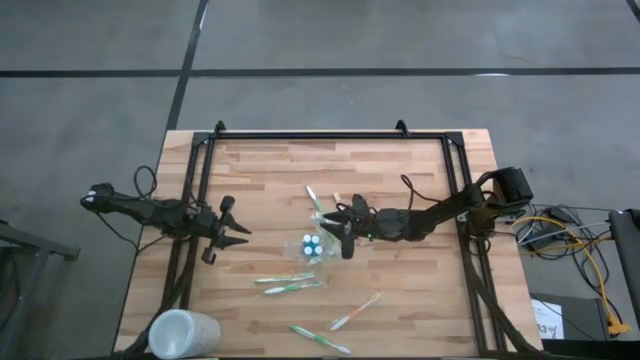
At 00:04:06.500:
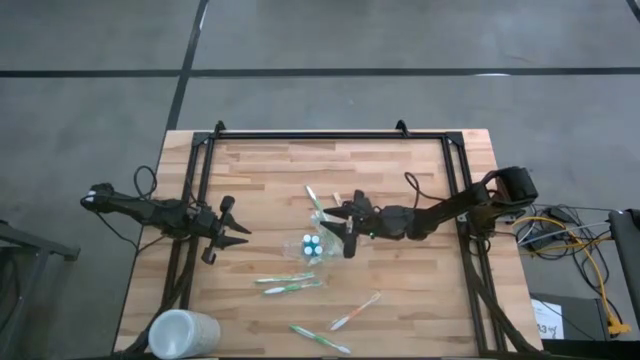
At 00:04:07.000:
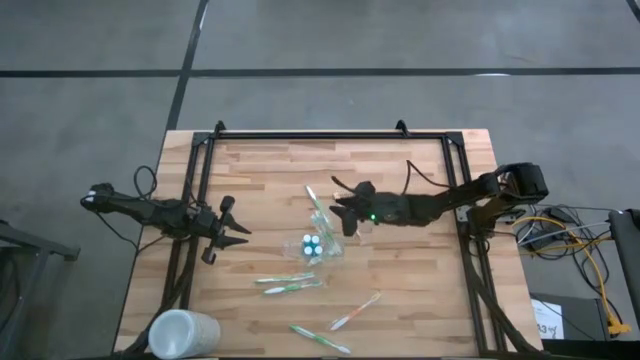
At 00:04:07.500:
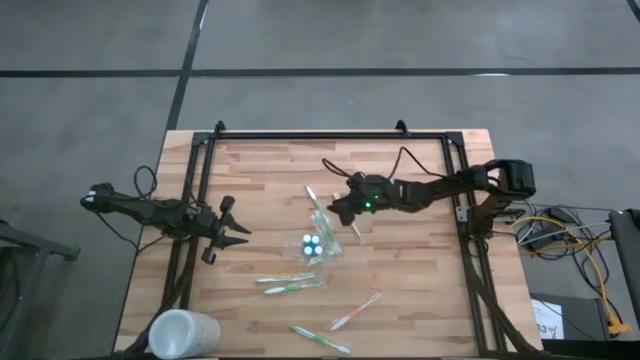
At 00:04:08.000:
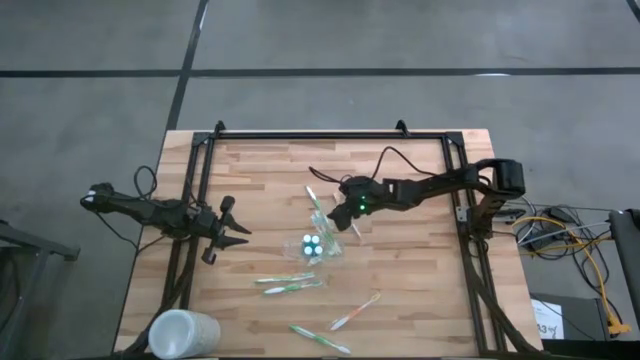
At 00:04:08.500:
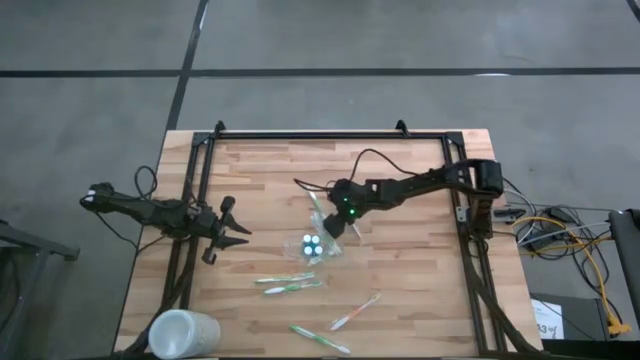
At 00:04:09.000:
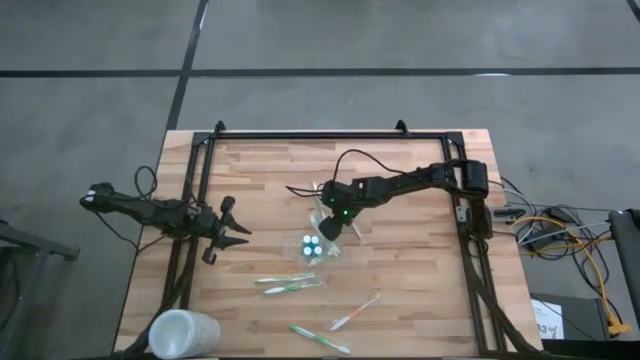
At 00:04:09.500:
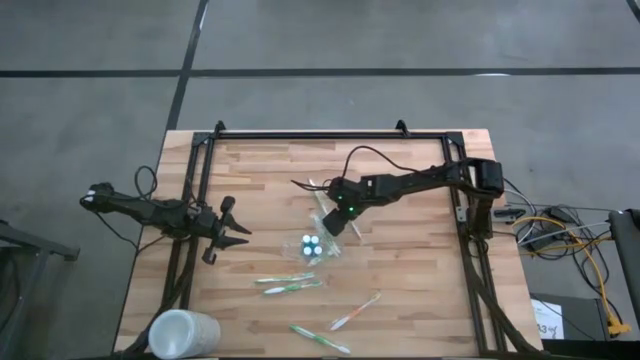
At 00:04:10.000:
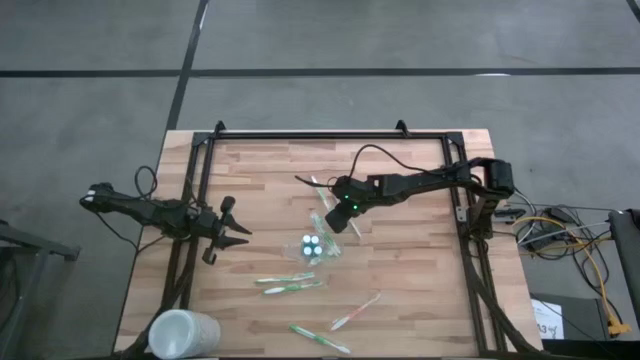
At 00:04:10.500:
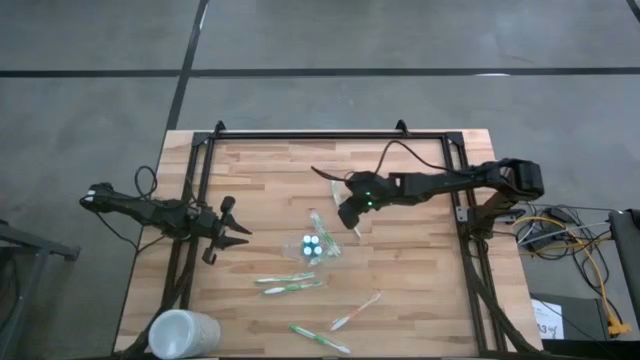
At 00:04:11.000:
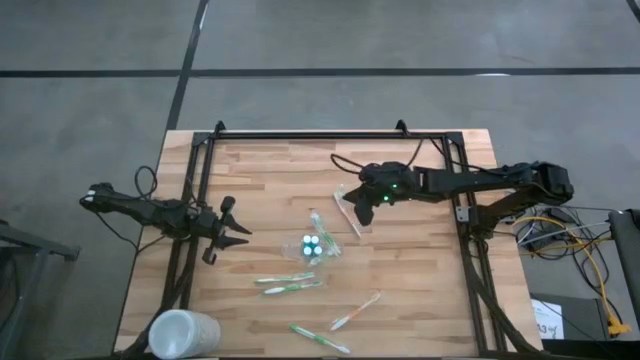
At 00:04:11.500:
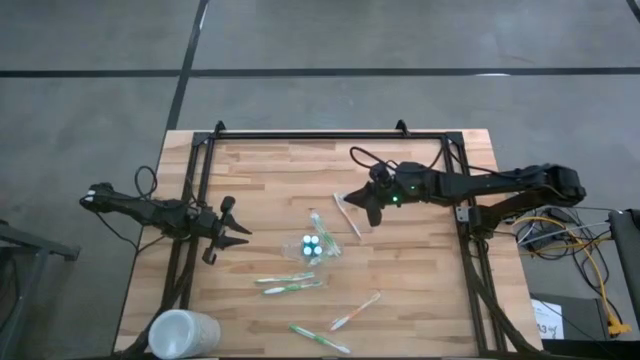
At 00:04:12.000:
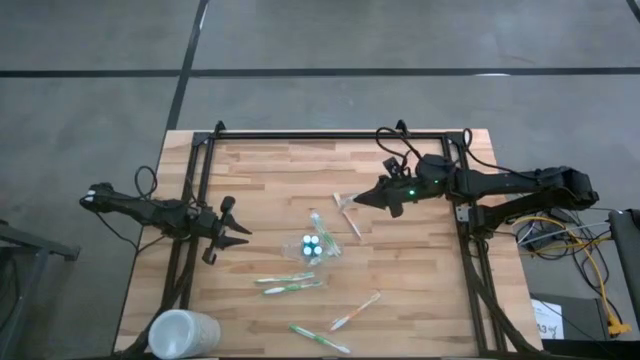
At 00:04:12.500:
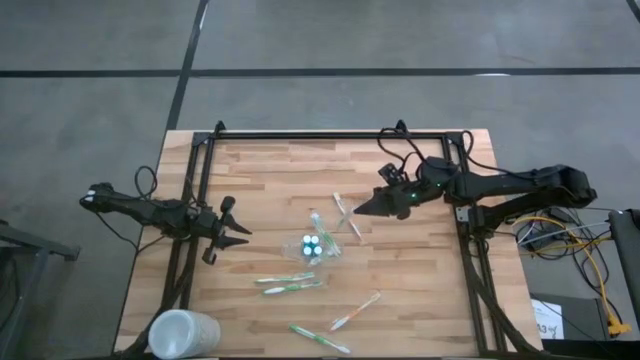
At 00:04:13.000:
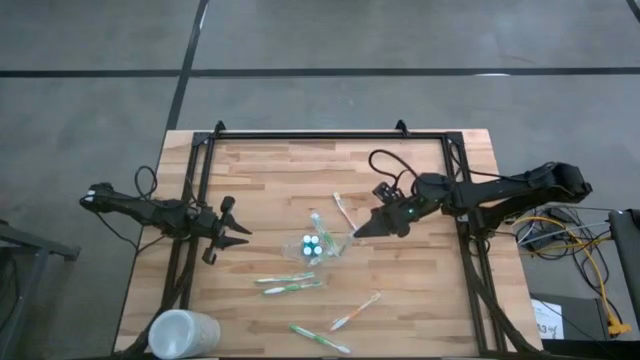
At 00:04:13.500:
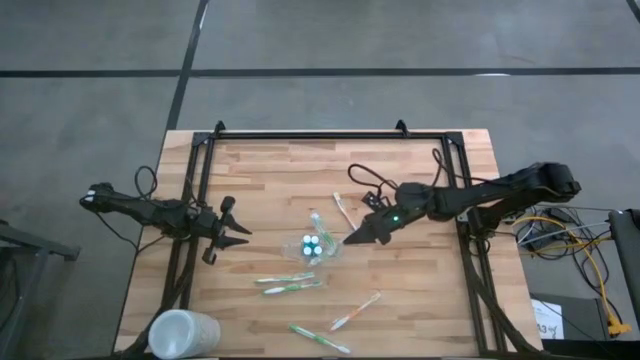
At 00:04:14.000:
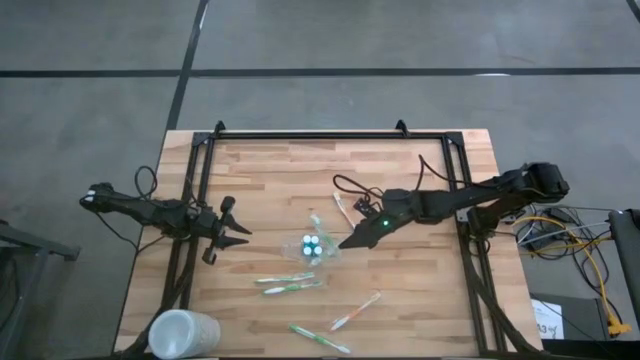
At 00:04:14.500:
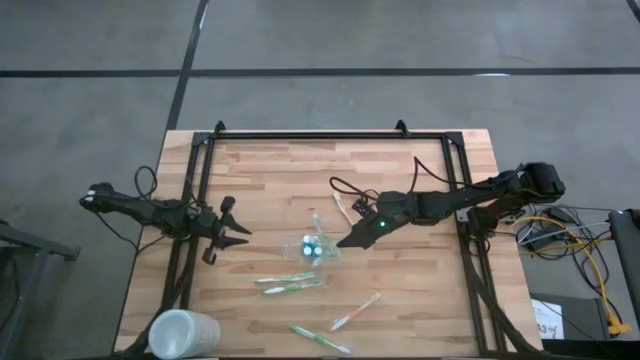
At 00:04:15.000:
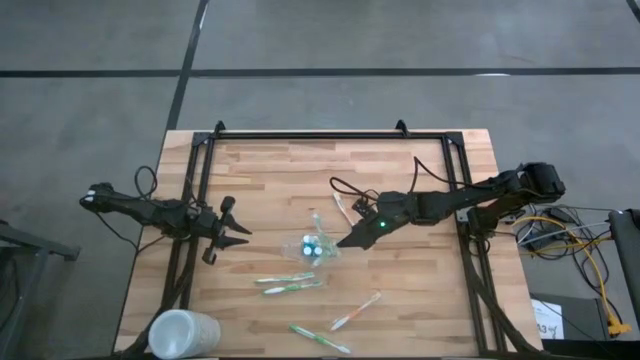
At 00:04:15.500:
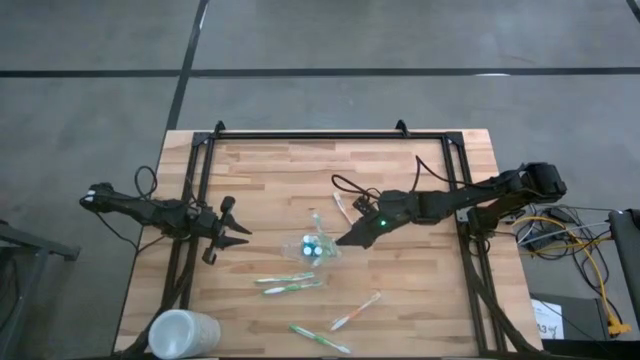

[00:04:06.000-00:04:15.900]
Task: Pick & Place toothbrushing station
Put the green toothbrush into the transparent organizer

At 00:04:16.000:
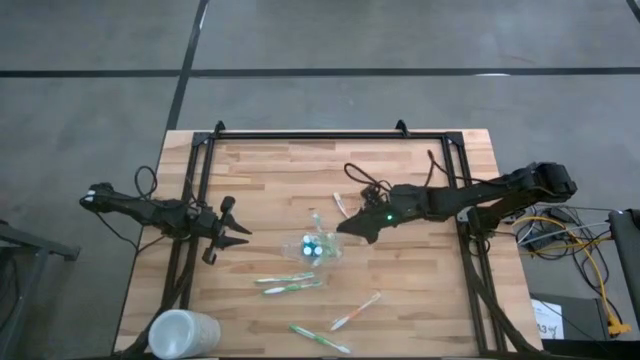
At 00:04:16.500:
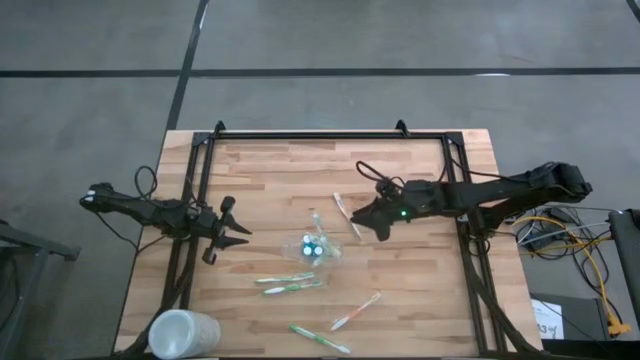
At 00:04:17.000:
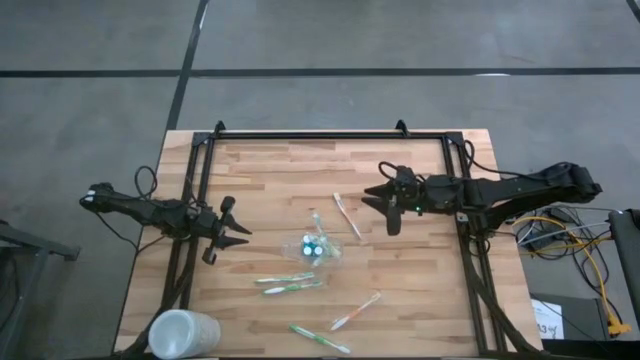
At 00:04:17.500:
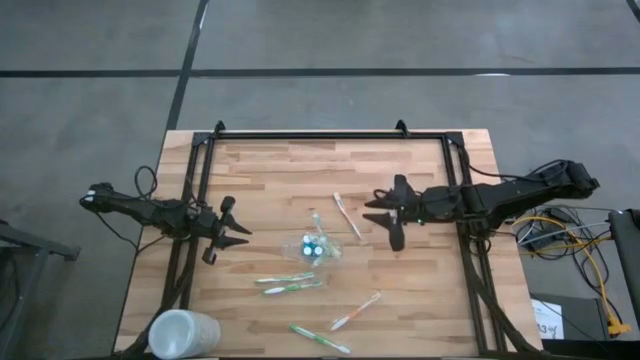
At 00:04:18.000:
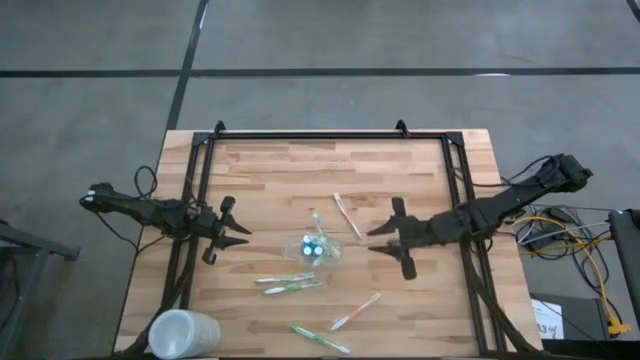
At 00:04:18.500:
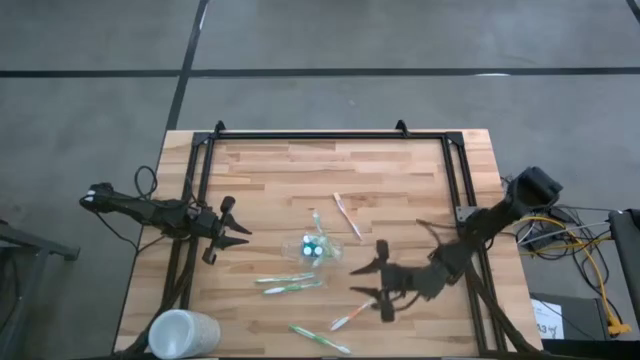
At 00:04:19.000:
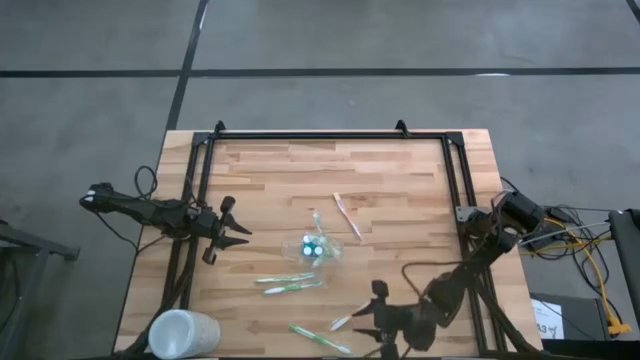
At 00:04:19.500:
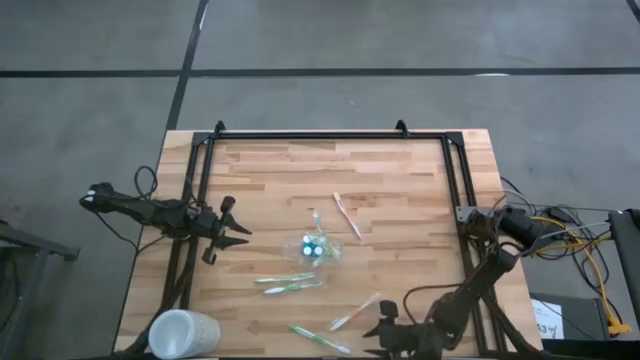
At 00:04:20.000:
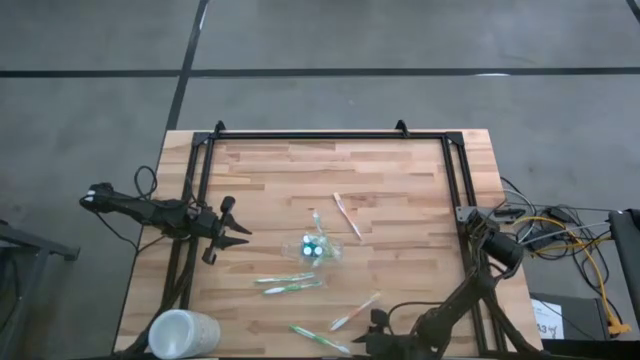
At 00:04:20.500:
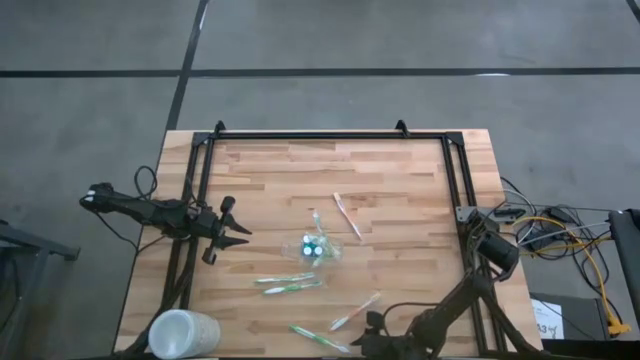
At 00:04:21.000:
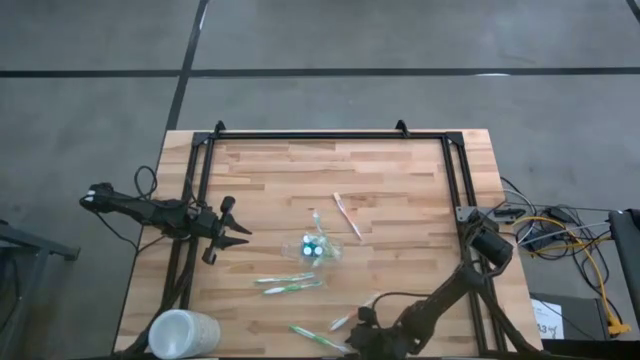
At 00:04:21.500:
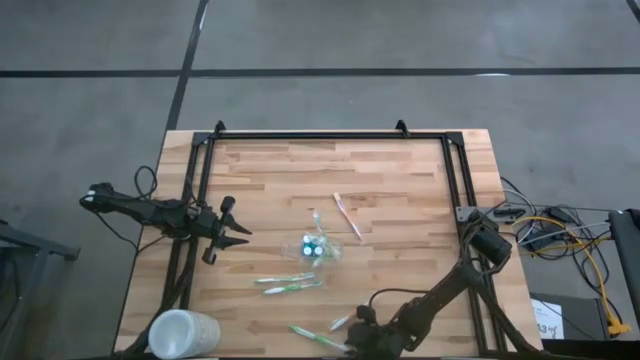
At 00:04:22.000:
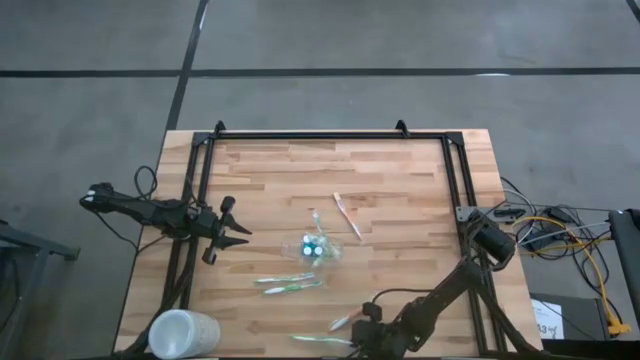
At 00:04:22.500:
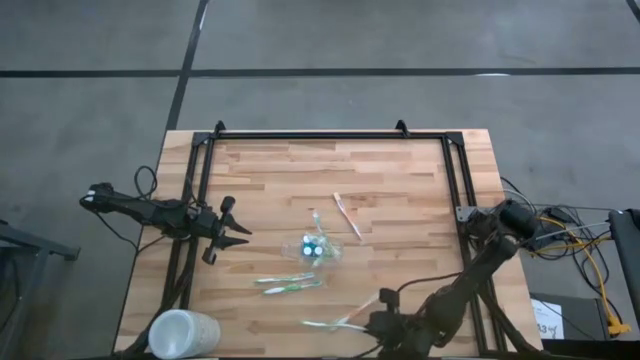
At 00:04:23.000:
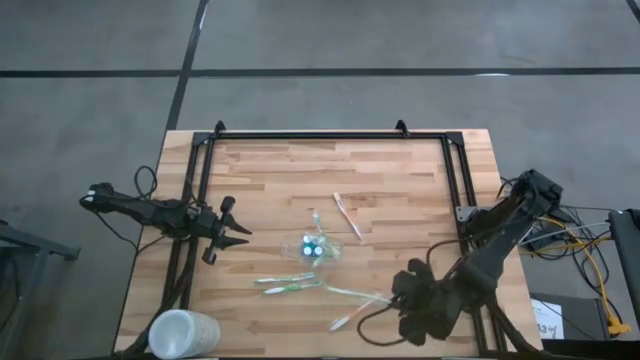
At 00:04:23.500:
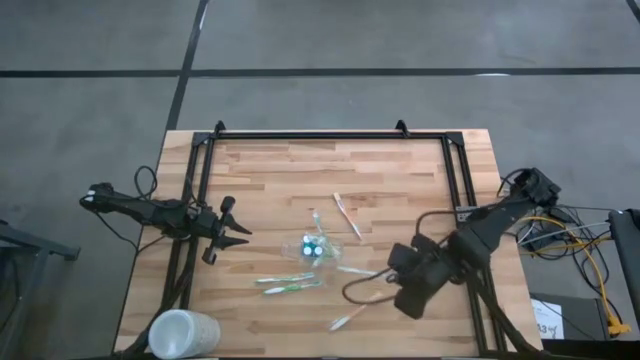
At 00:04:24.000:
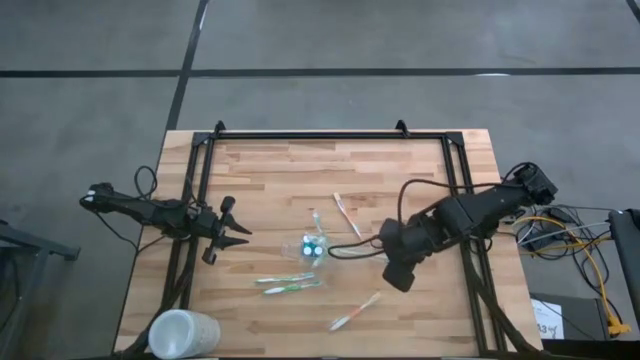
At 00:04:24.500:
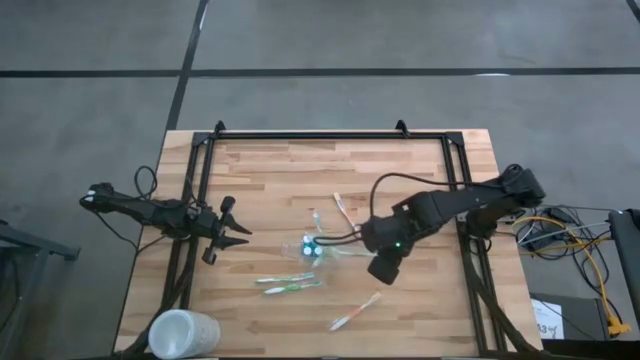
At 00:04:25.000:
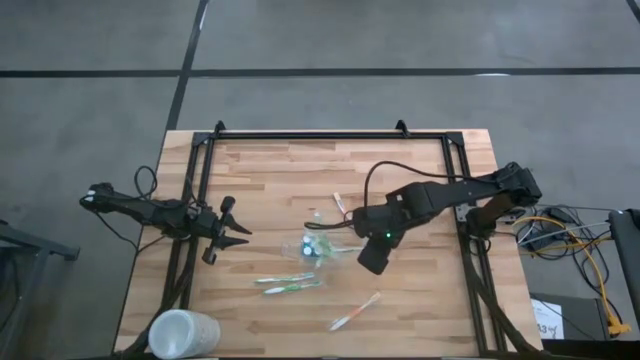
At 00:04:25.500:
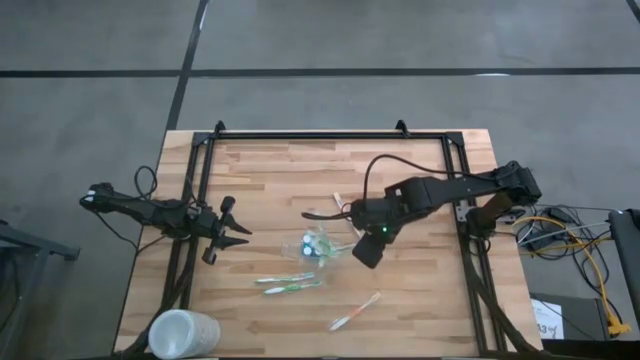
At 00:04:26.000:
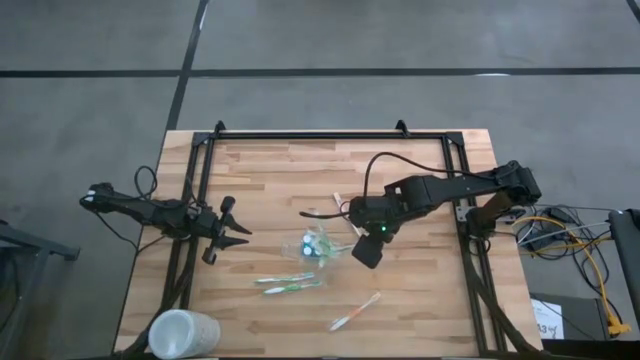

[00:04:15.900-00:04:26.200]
Put the green toothbrush into the transparent organizer
